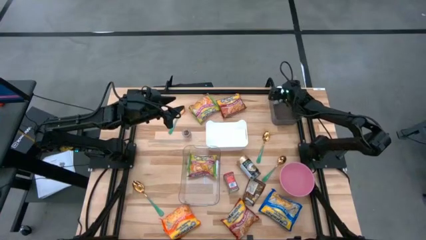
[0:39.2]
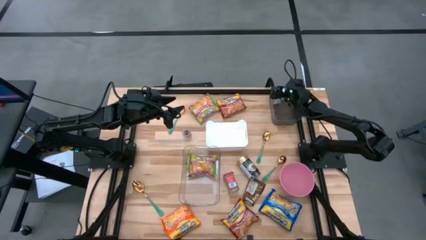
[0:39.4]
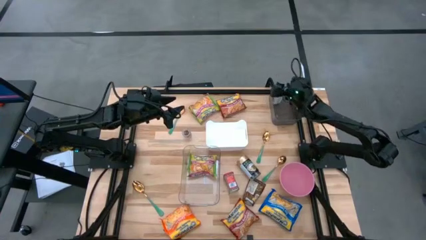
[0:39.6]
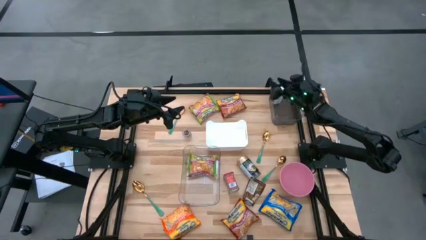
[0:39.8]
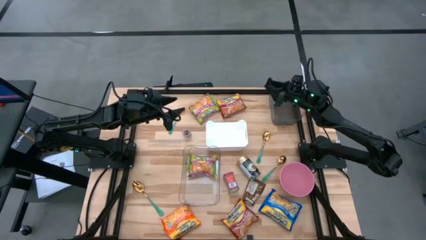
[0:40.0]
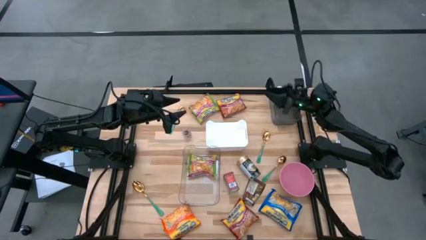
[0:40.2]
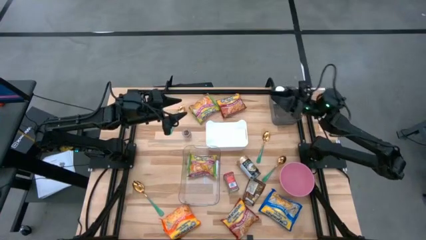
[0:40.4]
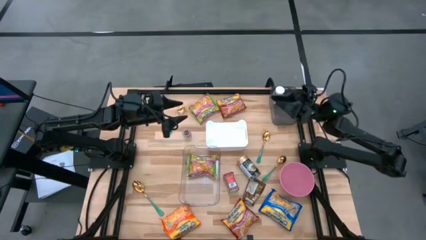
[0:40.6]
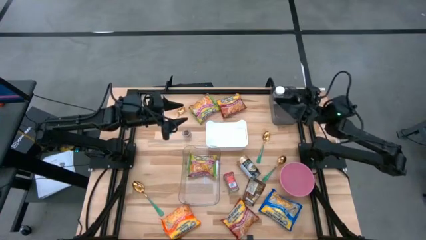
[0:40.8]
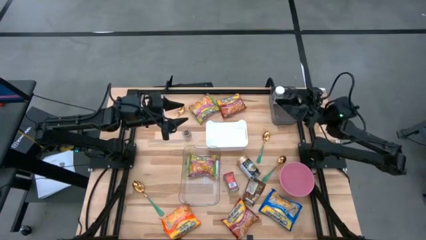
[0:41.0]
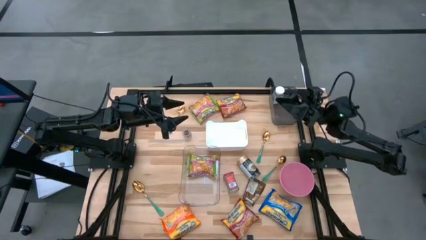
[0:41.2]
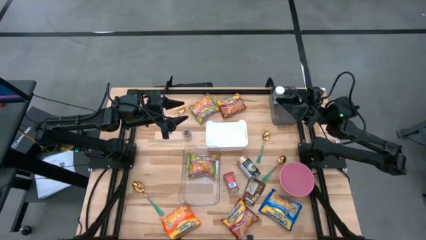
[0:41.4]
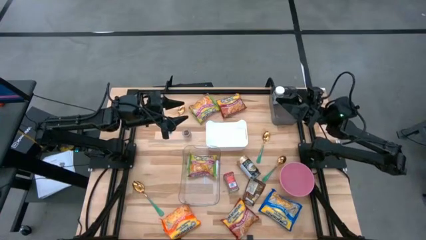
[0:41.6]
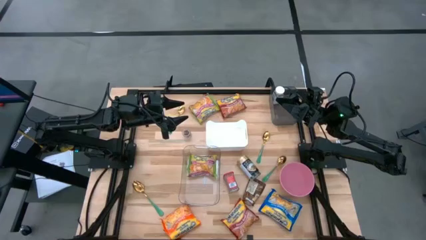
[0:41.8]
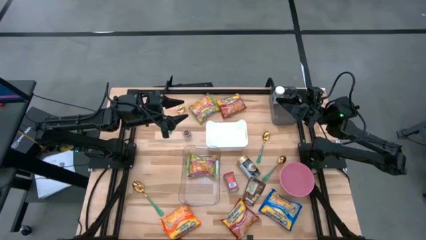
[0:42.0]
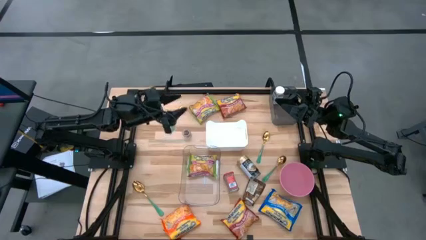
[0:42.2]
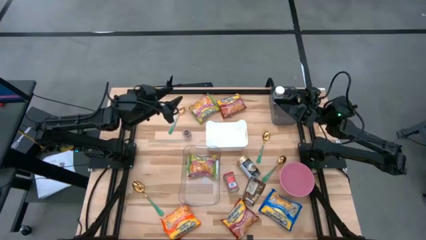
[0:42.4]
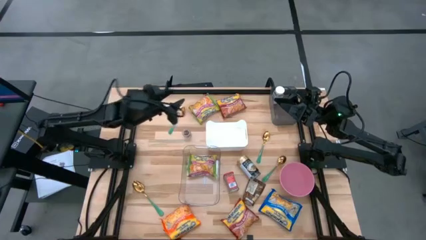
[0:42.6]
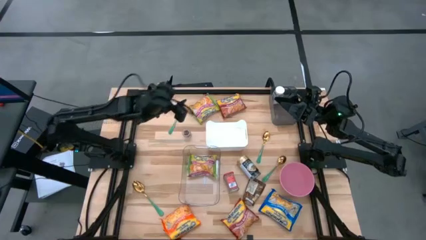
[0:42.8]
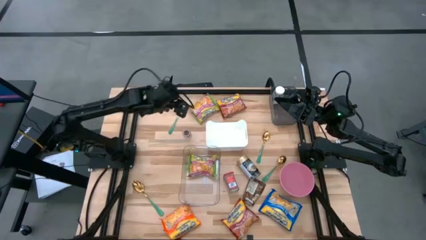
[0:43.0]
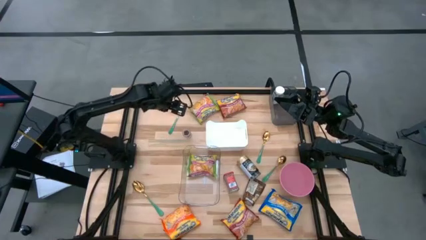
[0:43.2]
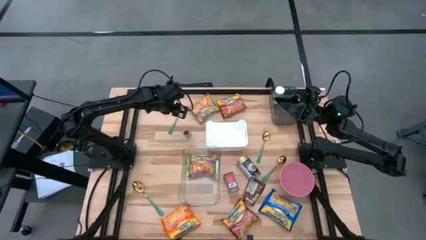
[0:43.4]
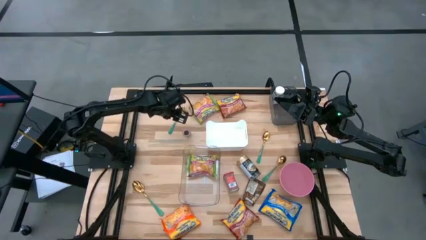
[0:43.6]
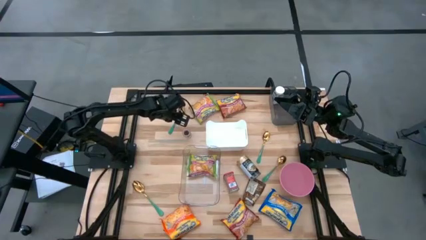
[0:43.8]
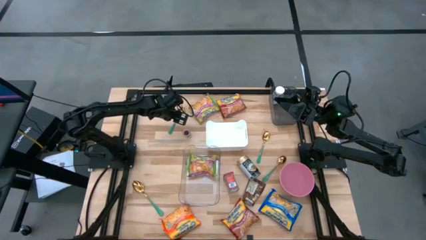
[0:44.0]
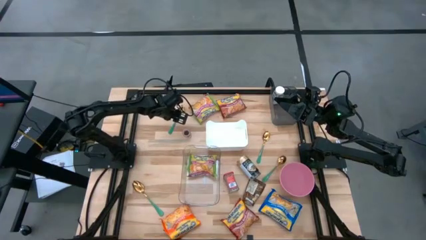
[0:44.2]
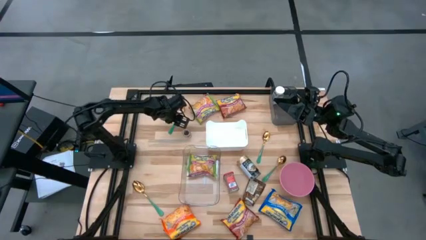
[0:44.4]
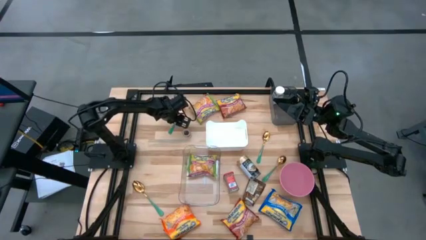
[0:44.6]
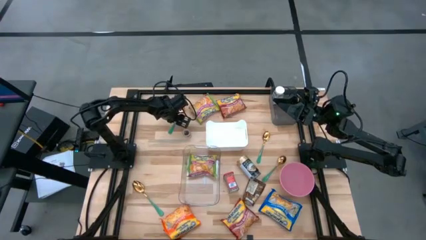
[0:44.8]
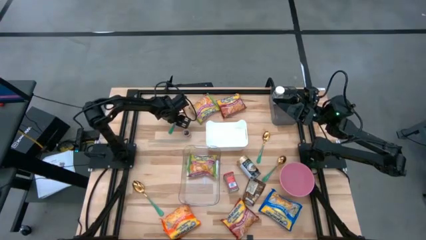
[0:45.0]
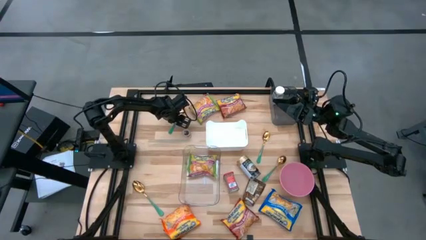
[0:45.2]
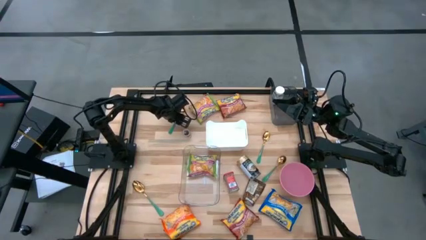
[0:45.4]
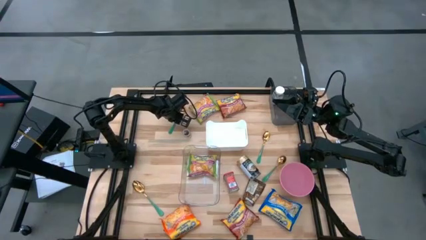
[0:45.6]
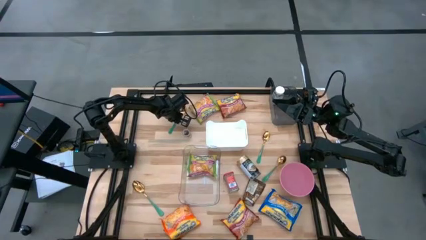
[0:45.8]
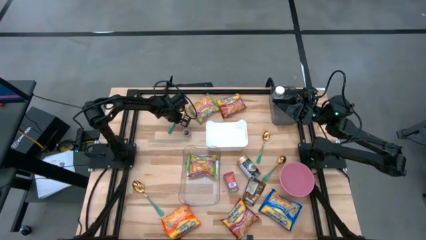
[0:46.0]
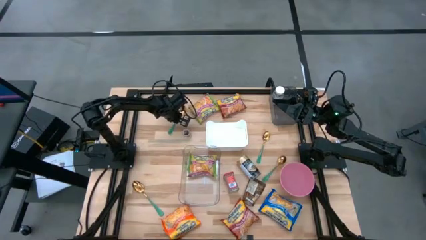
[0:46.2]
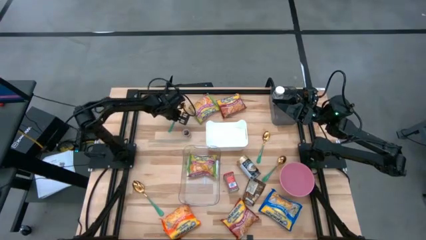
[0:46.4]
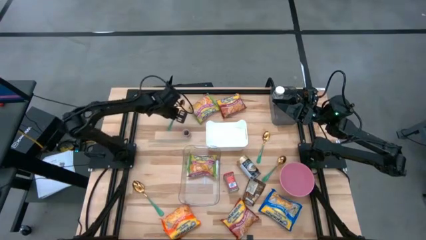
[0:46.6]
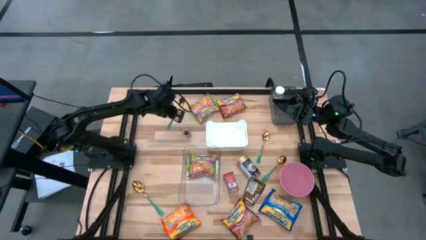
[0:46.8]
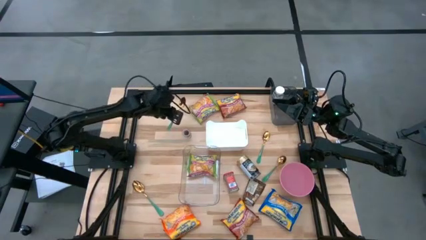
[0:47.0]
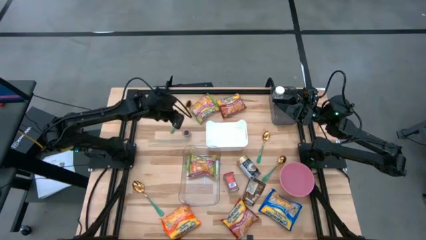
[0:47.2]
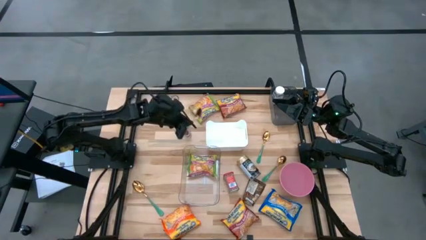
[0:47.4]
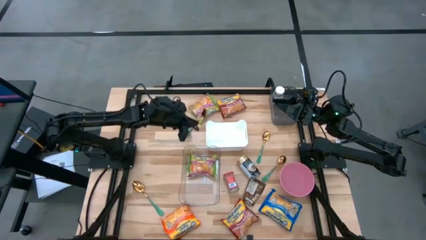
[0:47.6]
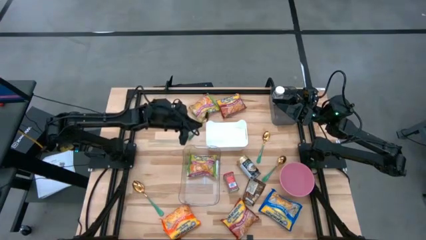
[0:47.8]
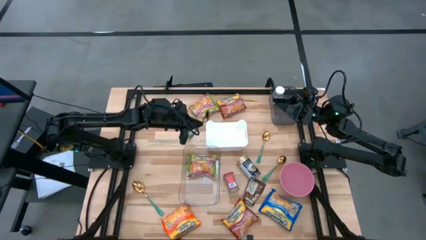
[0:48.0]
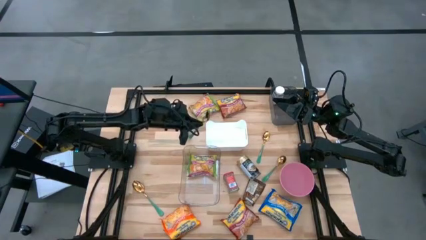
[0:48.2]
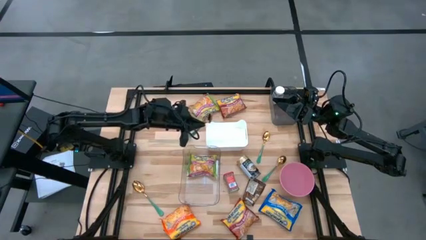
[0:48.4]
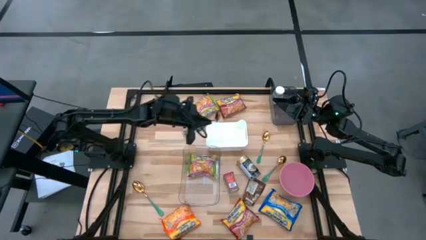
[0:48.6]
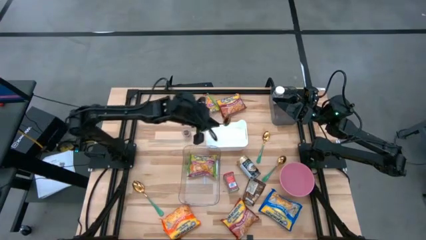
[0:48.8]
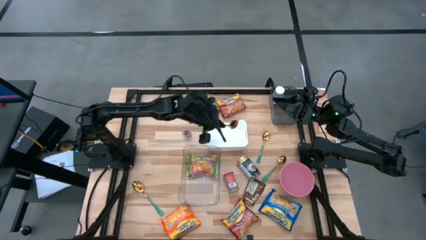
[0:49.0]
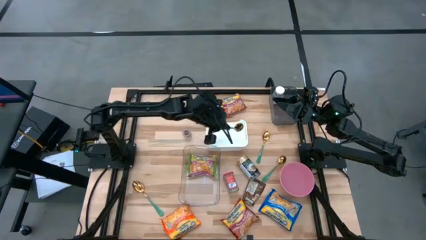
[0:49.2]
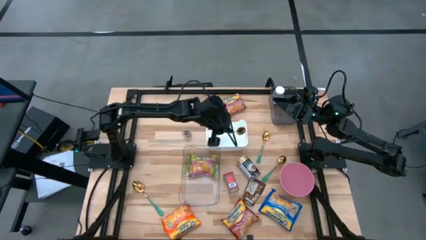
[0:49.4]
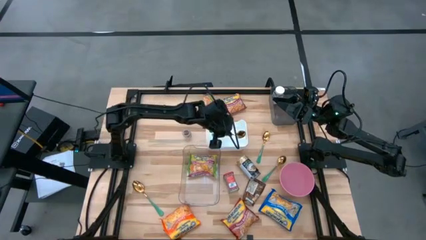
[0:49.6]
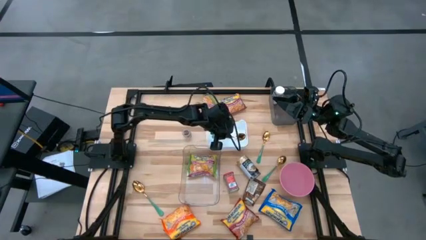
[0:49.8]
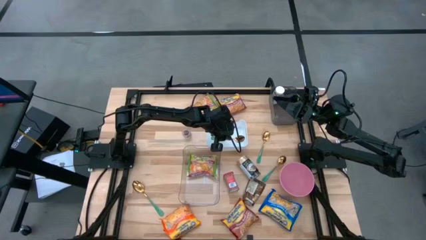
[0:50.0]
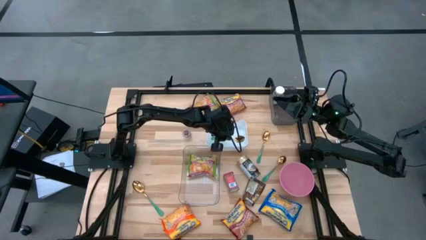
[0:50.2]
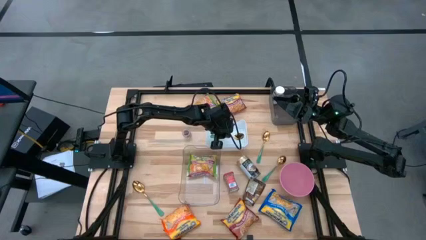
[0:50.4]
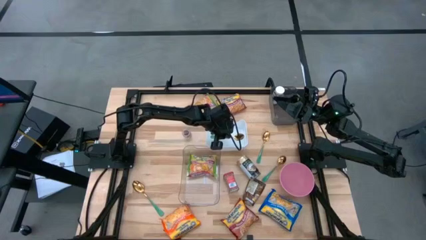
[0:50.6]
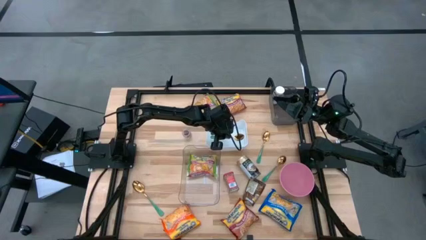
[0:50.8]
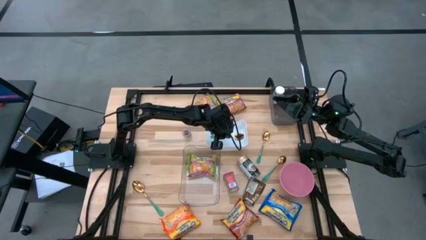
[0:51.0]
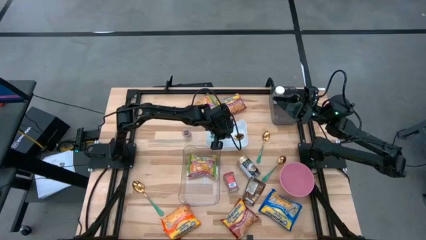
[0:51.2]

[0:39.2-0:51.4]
Task: Pick & Place Food Item
Put the green spoon into the white bin
